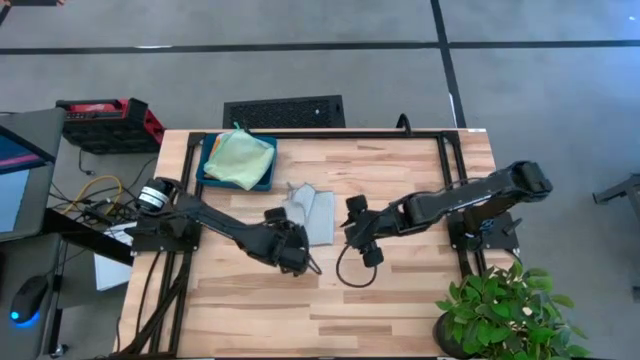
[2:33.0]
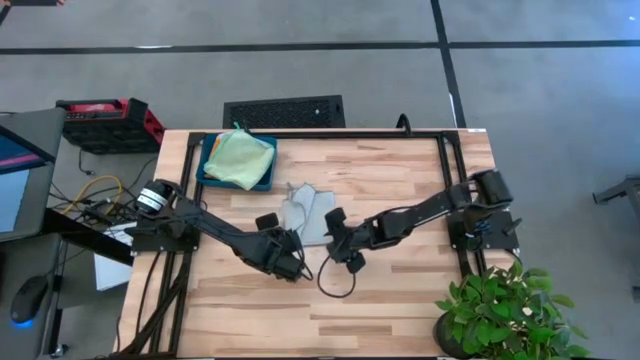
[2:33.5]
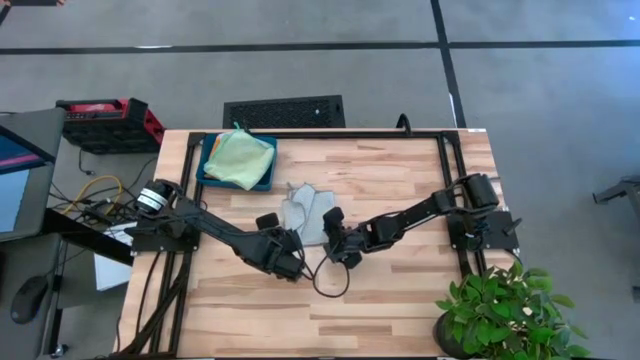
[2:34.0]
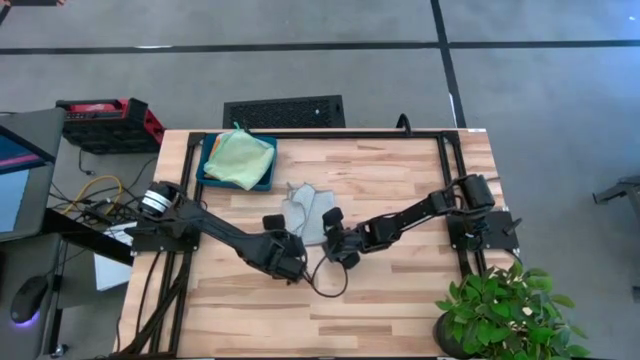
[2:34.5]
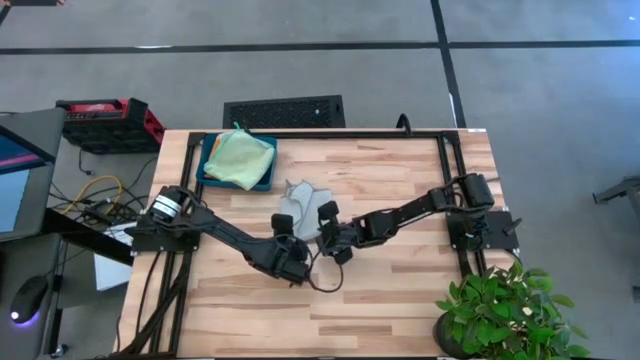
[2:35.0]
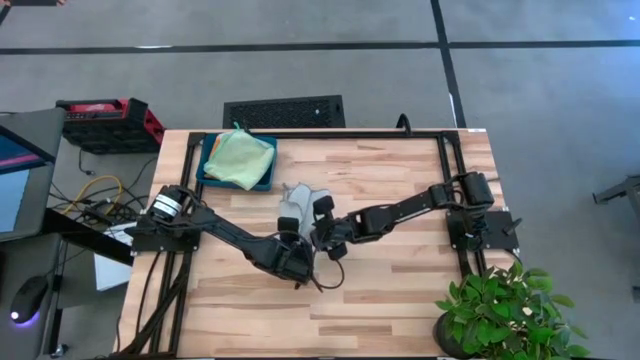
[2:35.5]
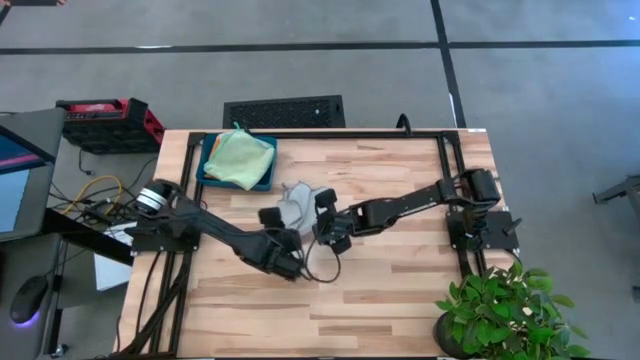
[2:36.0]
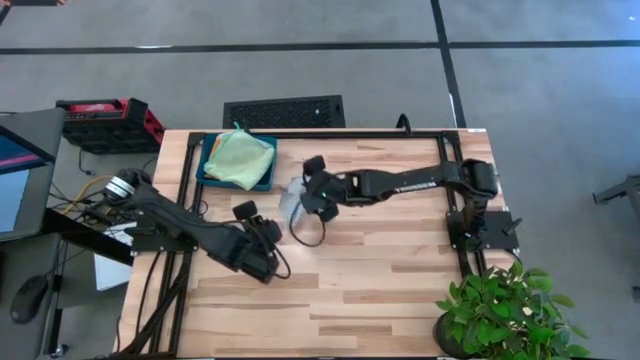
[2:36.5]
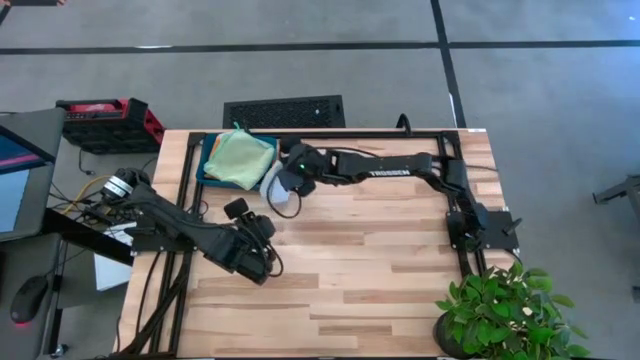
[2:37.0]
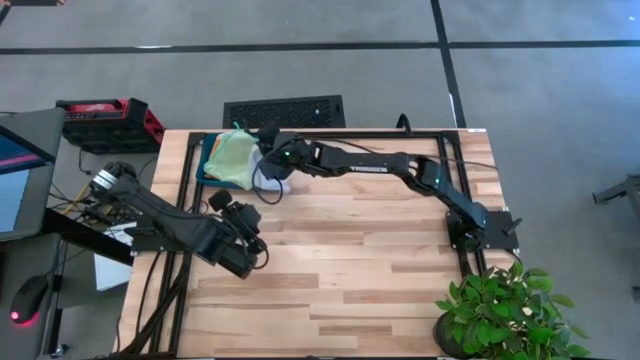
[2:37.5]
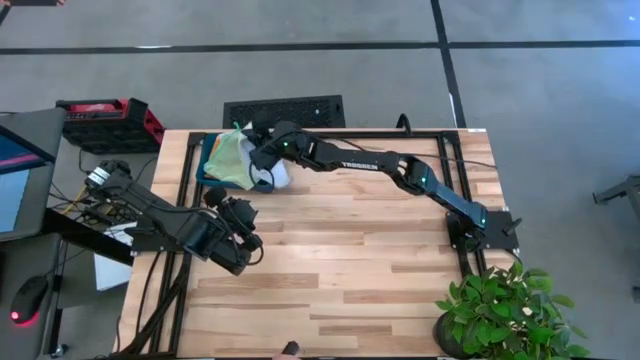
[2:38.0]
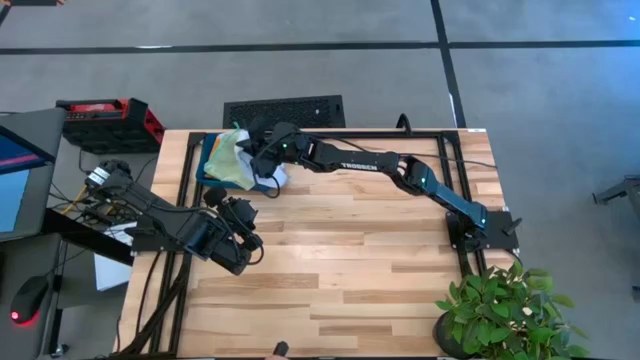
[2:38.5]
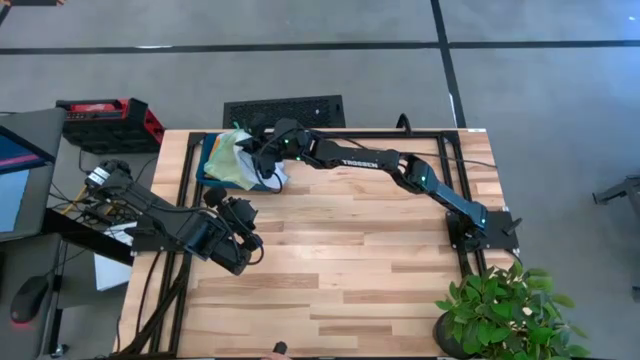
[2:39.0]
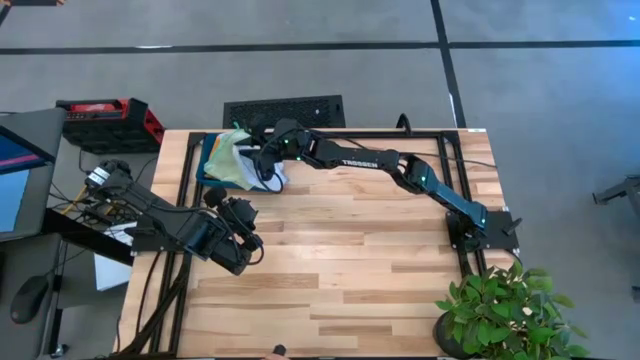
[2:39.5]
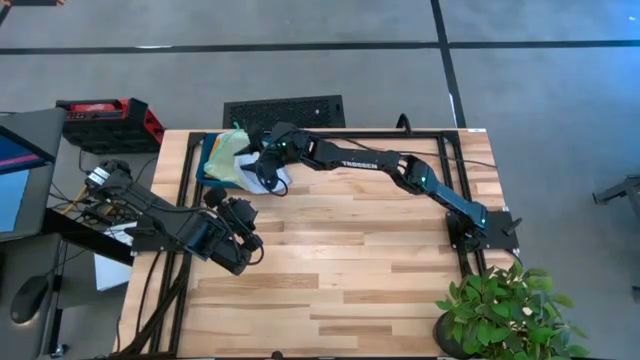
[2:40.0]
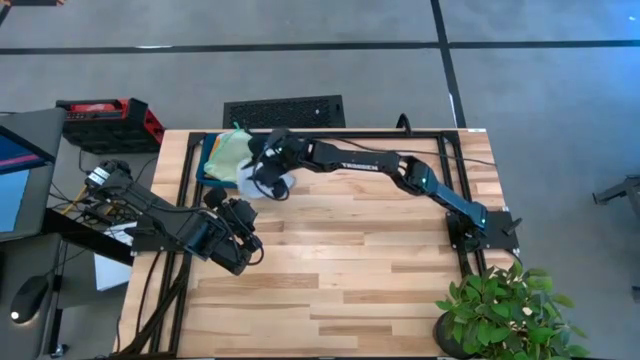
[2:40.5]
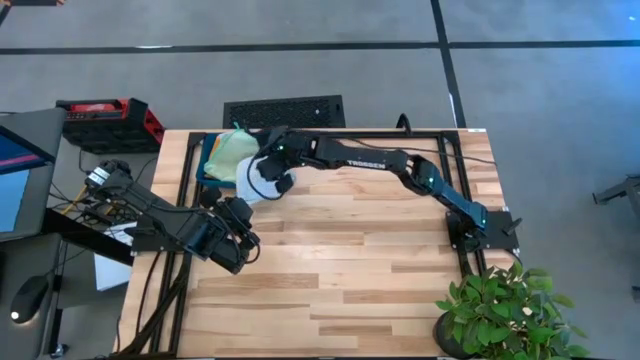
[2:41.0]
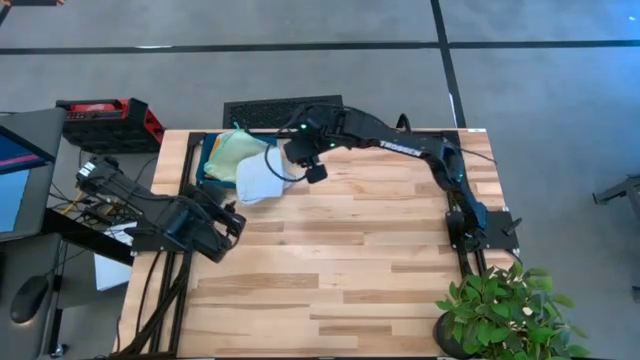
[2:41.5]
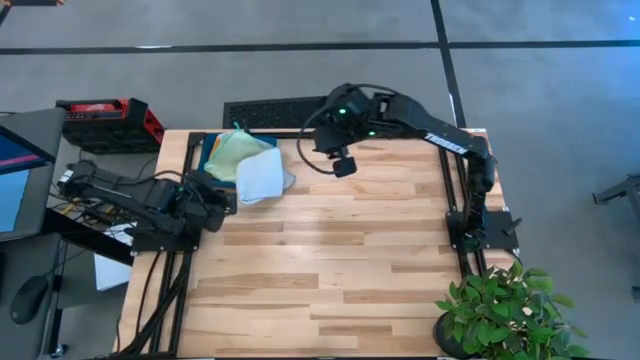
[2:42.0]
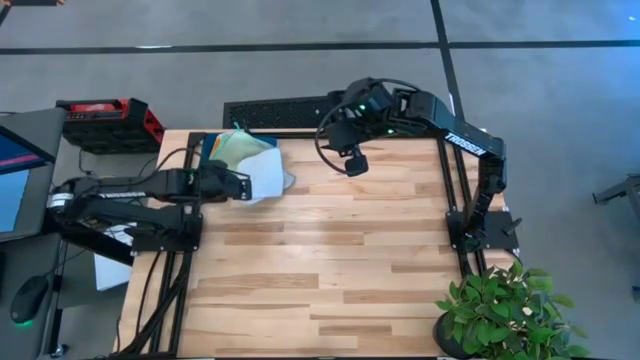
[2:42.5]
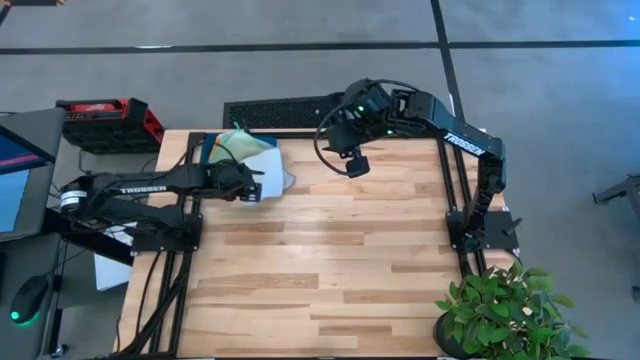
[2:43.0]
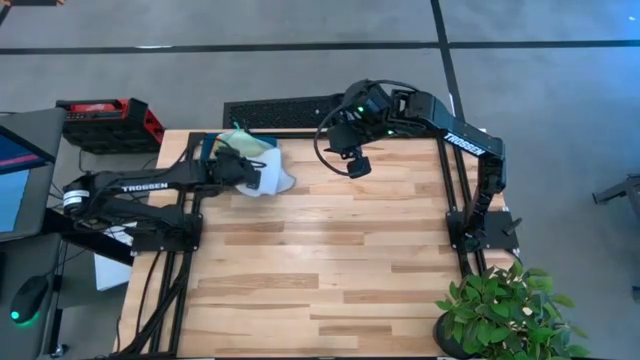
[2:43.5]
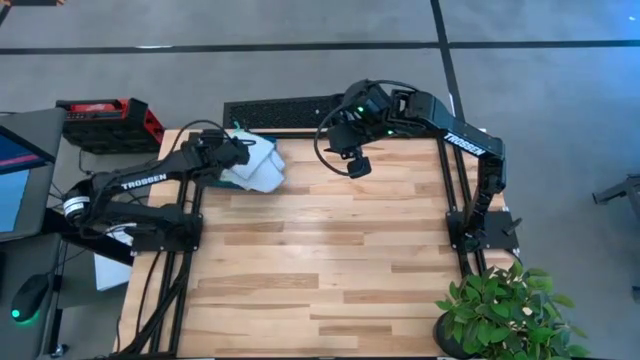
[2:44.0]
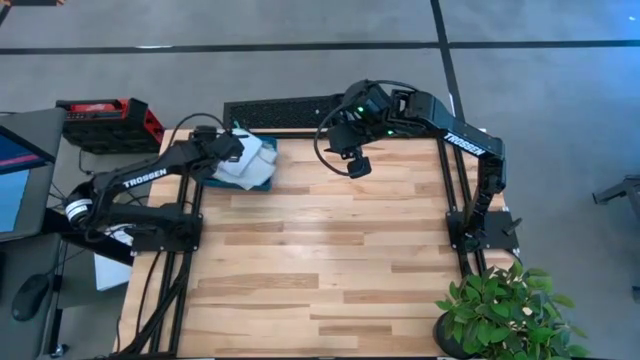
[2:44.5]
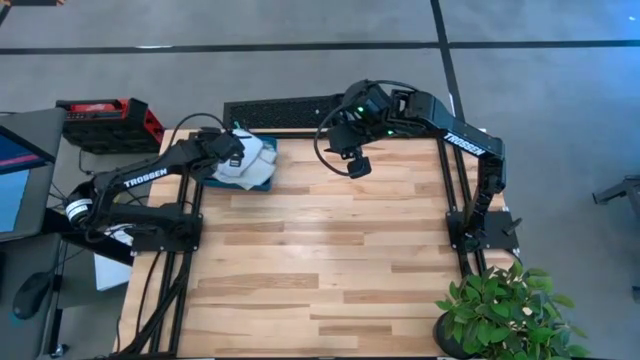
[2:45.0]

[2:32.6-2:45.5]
Task: Fold microfiber towels
Put the folded gray towel into the blue bin

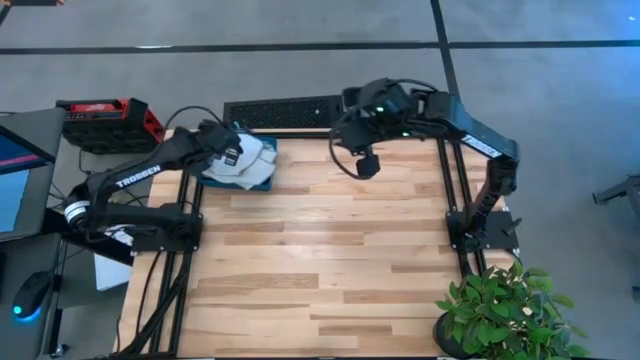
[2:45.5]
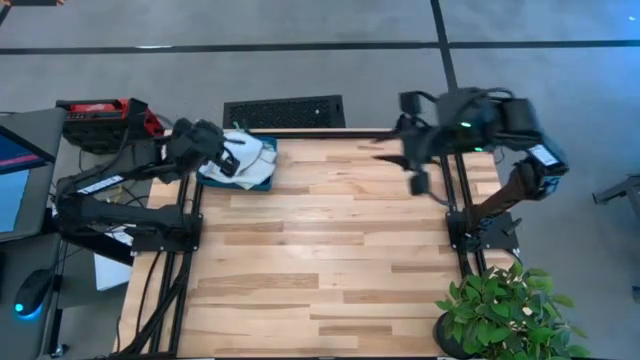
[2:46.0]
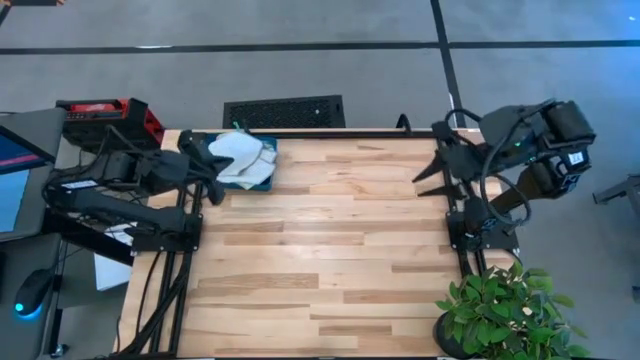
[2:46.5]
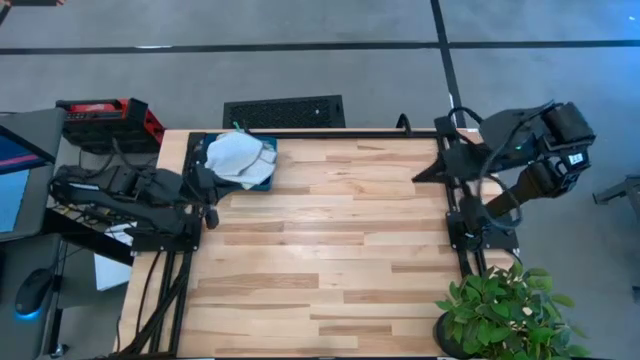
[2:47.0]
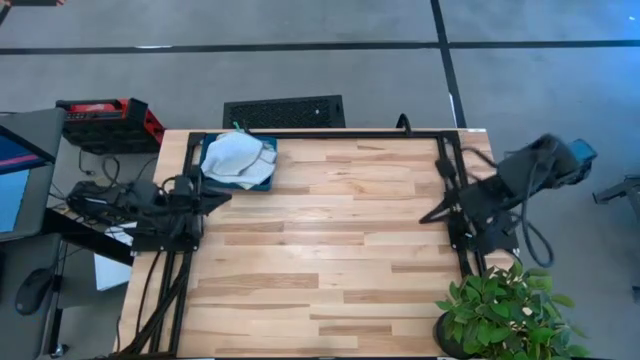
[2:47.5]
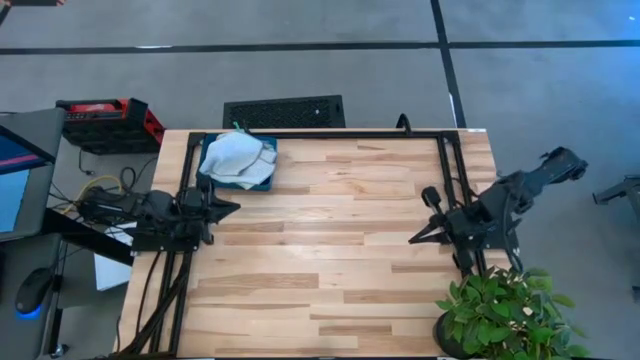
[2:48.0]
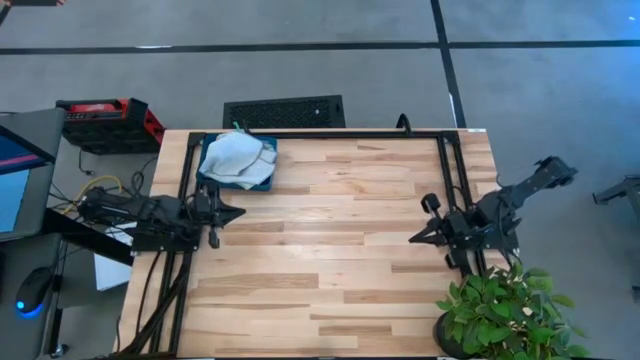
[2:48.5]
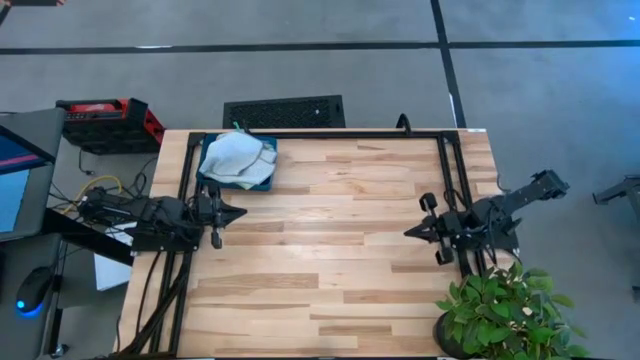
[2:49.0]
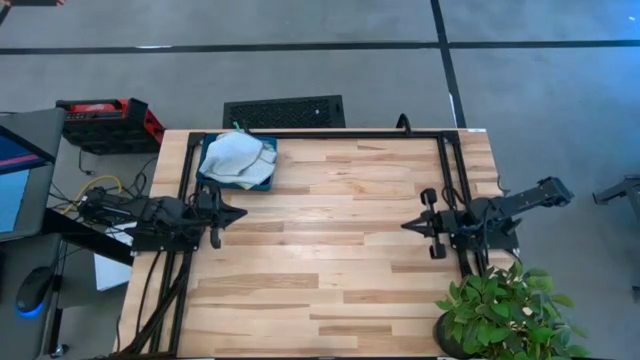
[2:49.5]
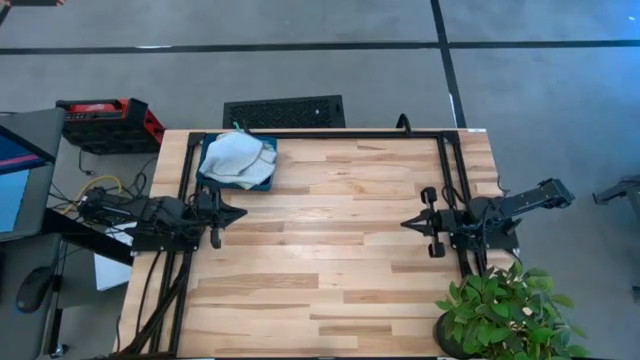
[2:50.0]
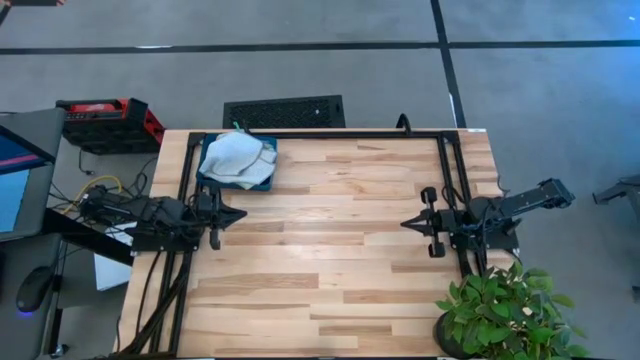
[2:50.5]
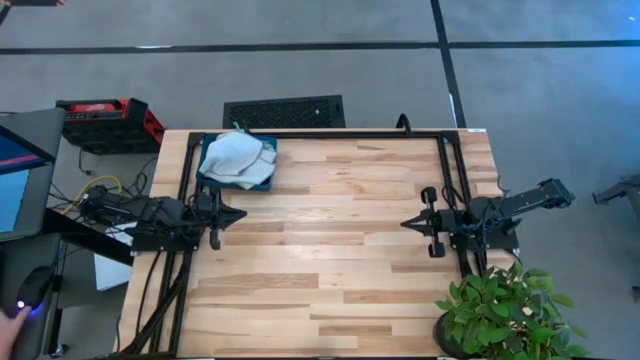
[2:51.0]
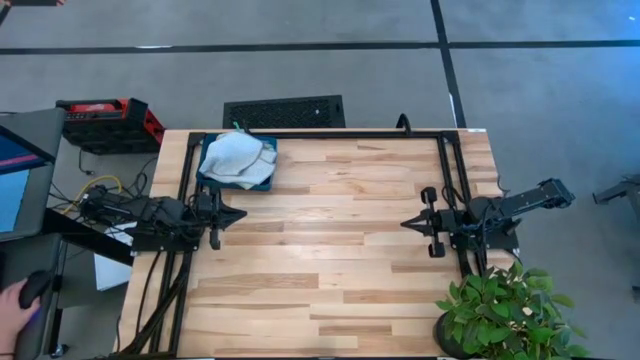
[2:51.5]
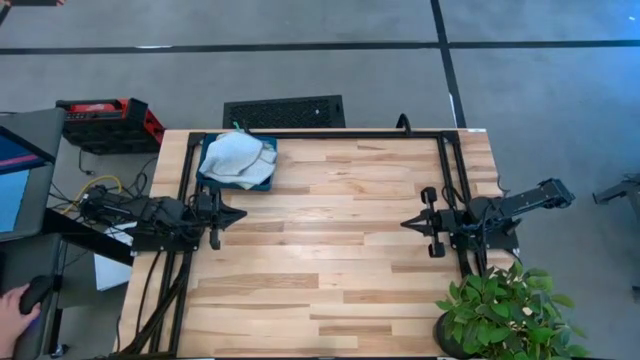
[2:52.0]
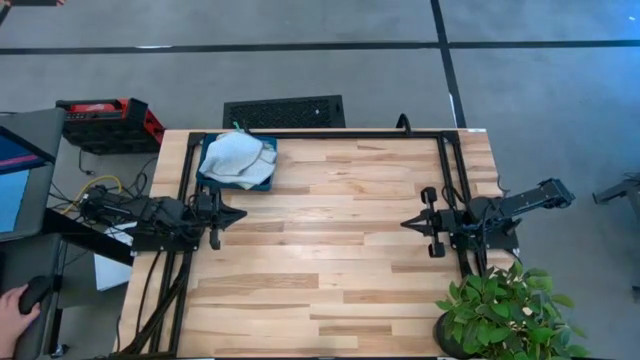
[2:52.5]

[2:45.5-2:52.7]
Return to Home Position

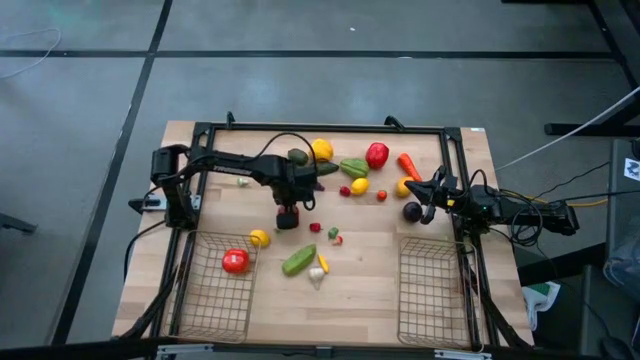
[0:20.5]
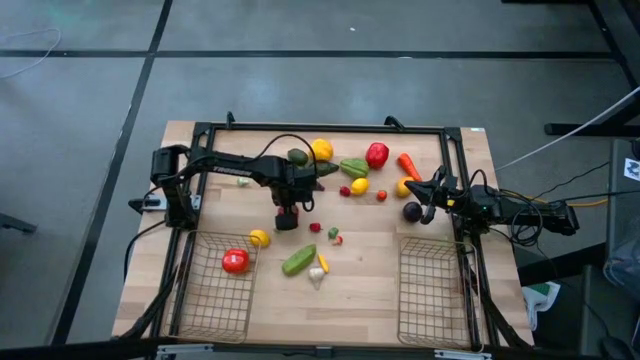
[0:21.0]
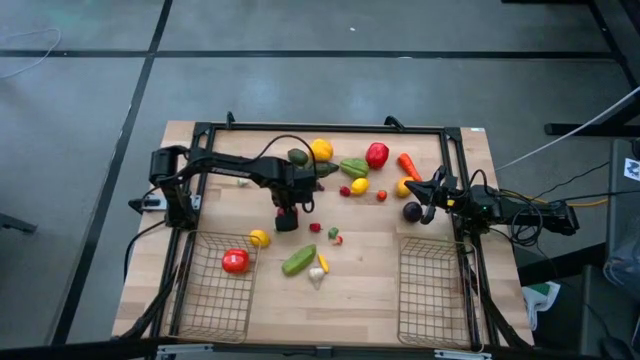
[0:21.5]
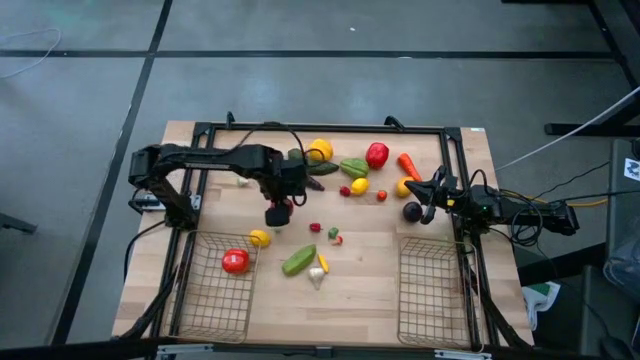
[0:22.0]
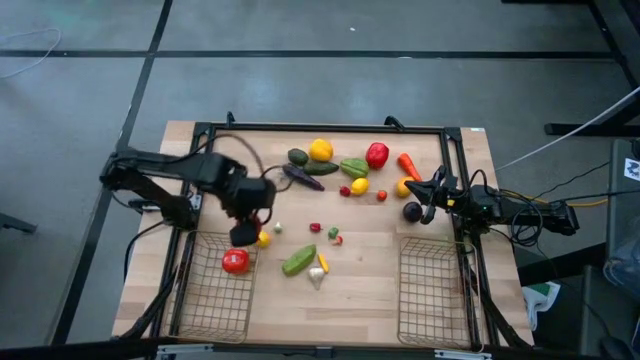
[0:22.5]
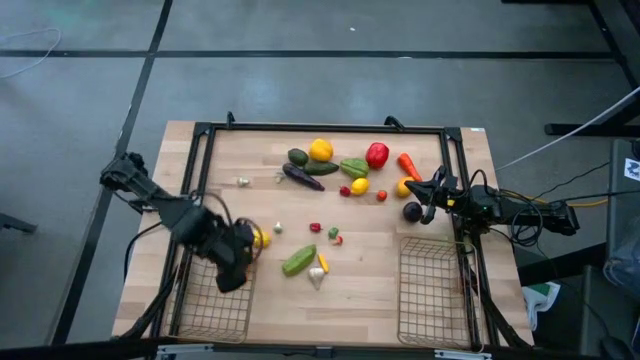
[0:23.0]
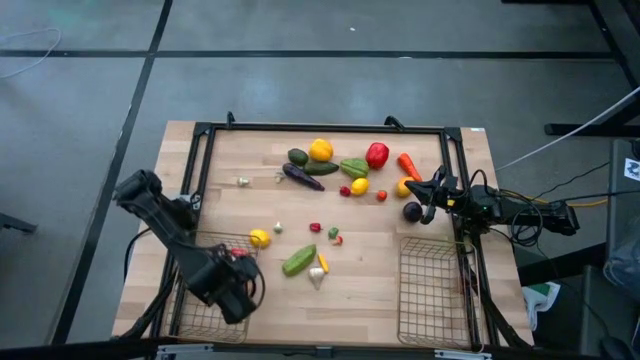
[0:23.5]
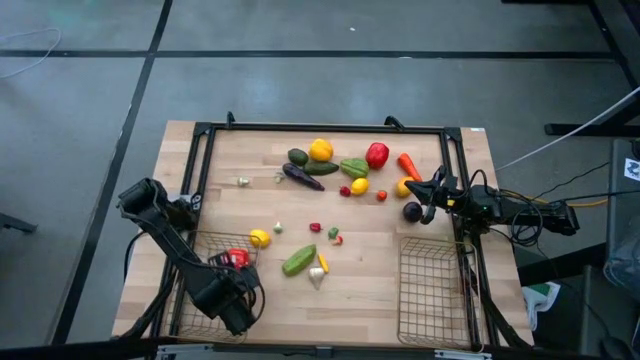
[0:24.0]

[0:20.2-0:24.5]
Task: Sort produce into baskets
Put the red tomato into the left wire basket
